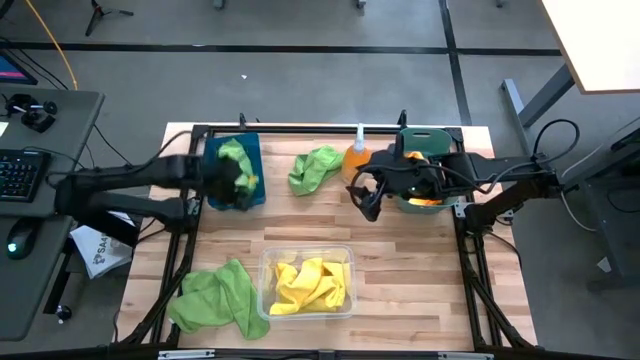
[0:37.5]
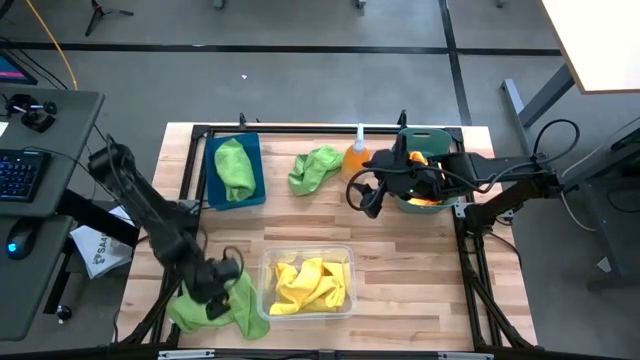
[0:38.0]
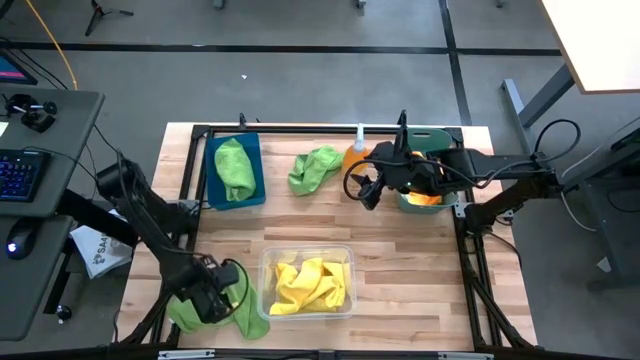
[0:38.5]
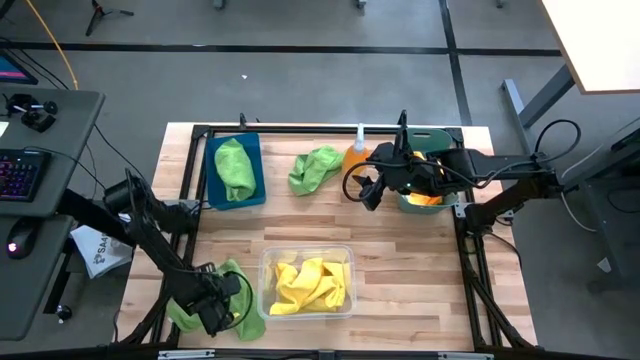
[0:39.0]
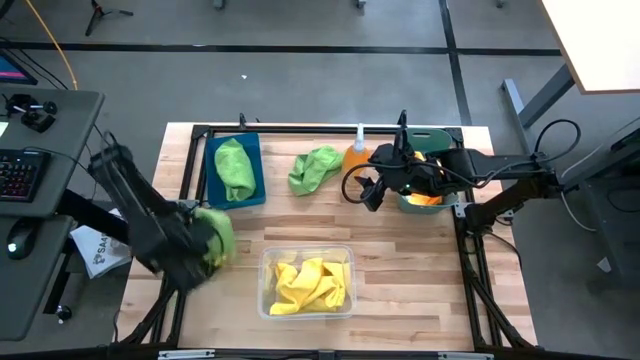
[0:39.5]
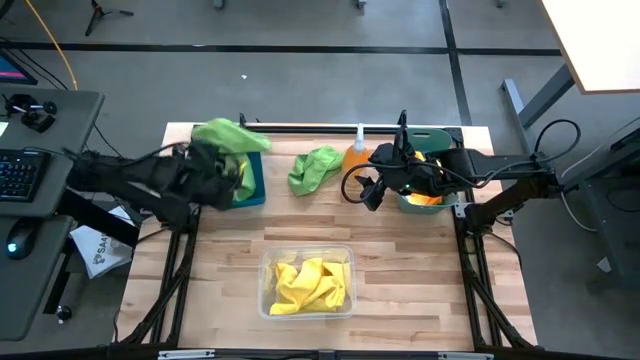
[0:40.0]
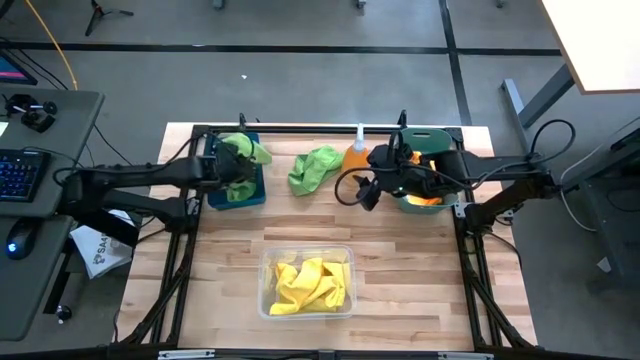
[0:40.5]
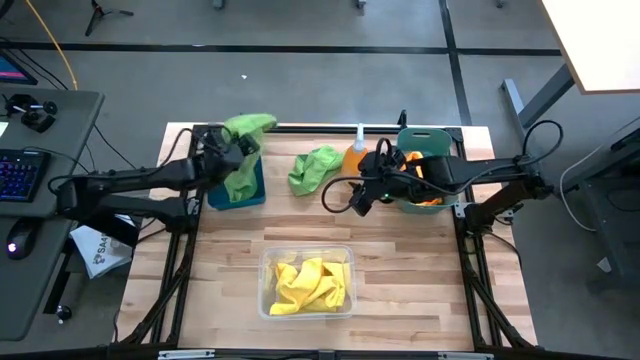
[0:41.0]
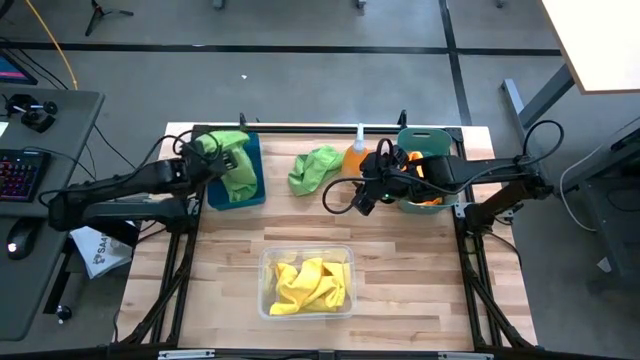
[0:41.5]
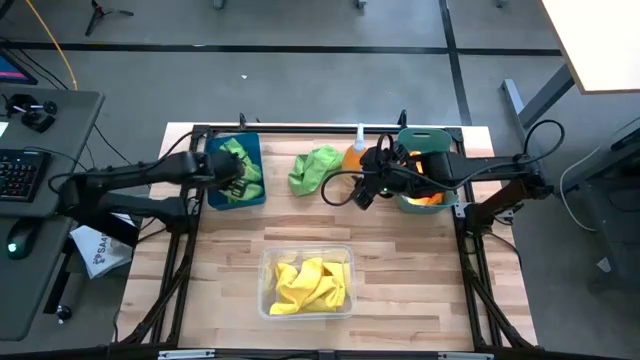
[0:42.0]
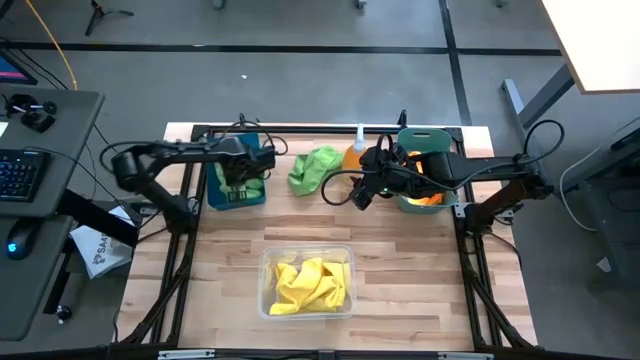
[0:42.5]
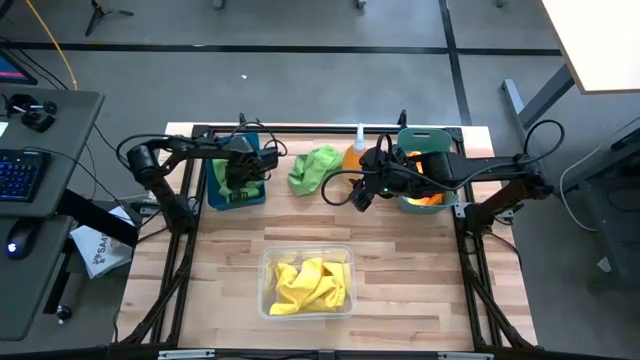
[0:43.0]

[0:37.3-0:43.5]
Task: Sort microfiber towel by color & place in baskets
Put the bottom green microfiber cloth into the blue bin

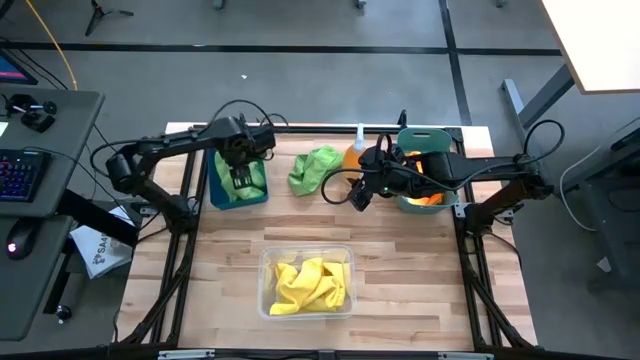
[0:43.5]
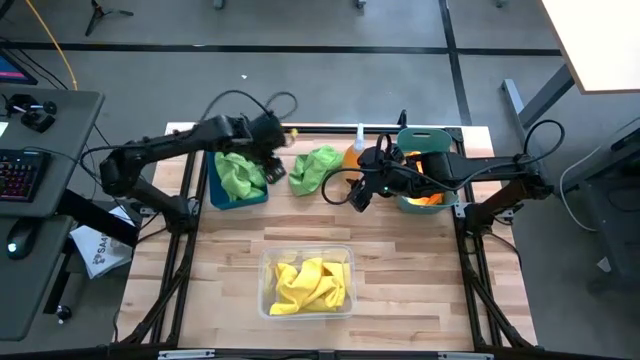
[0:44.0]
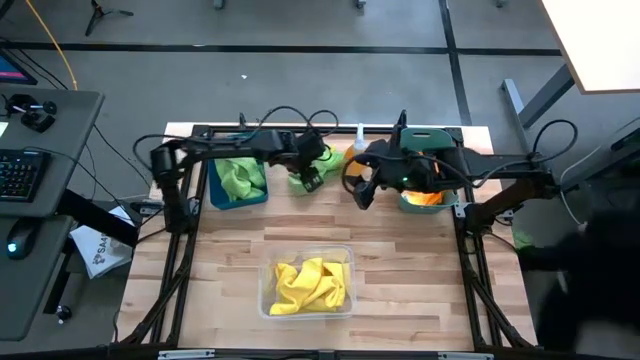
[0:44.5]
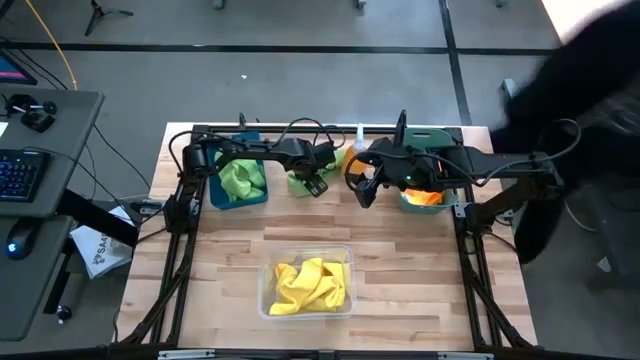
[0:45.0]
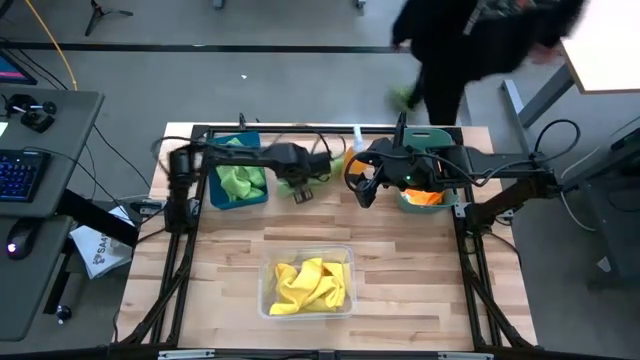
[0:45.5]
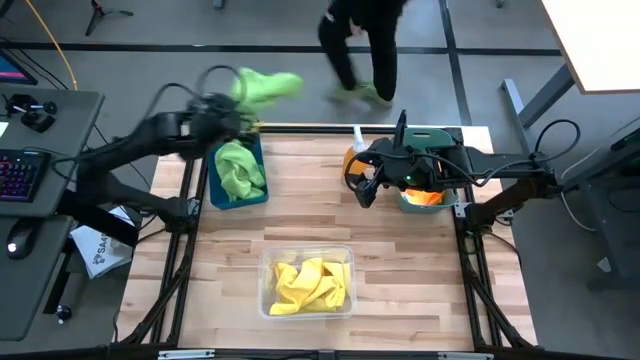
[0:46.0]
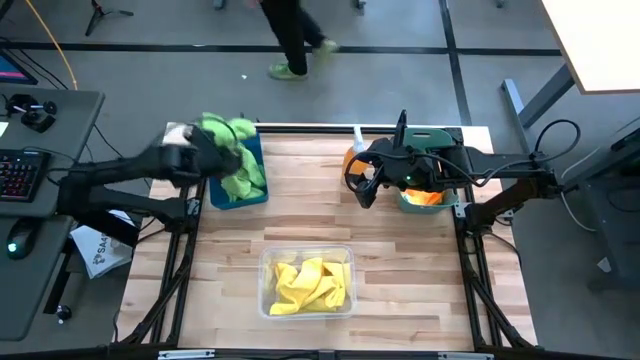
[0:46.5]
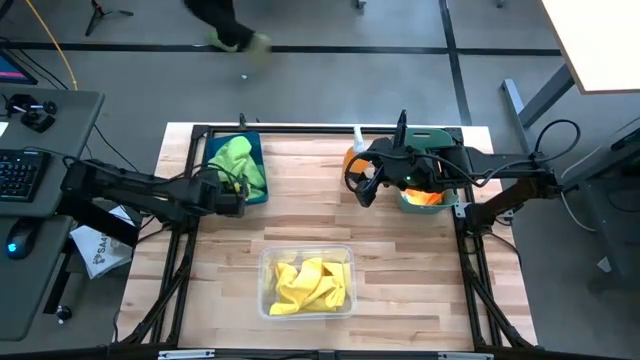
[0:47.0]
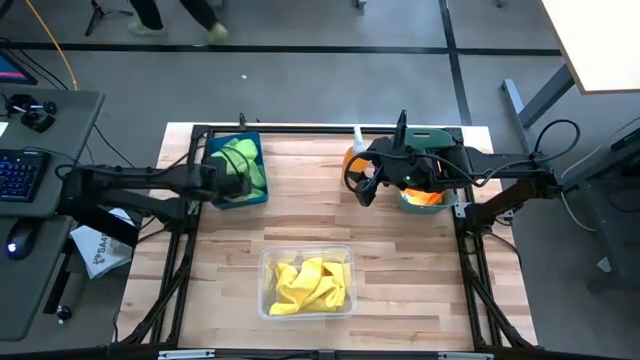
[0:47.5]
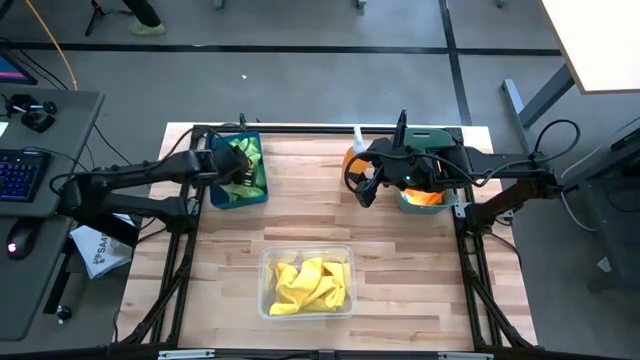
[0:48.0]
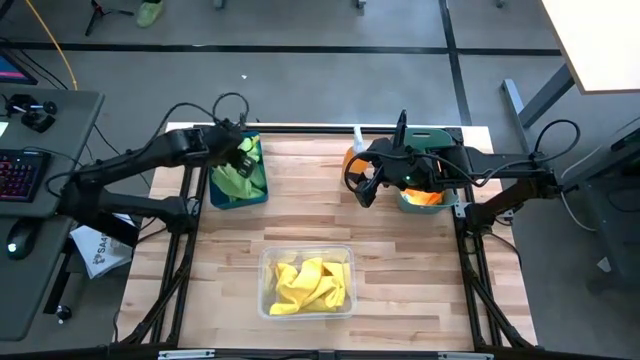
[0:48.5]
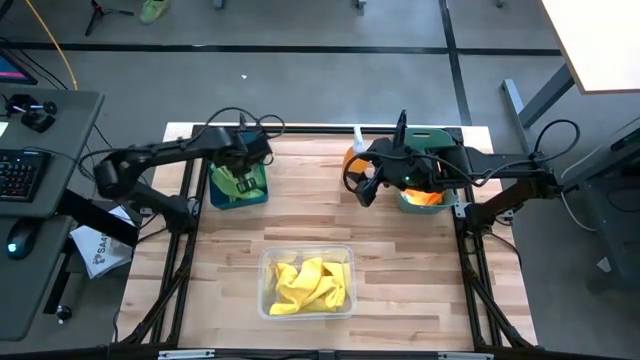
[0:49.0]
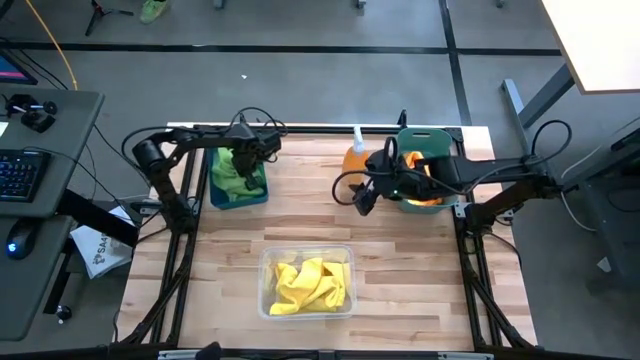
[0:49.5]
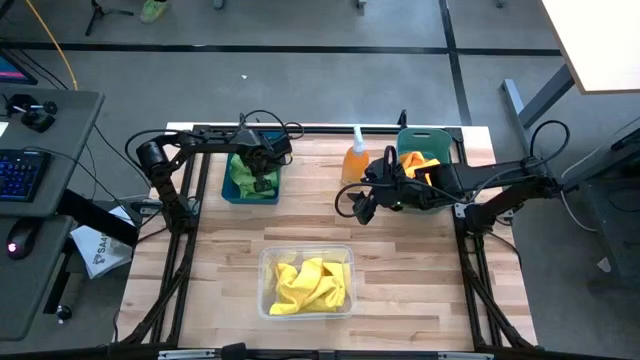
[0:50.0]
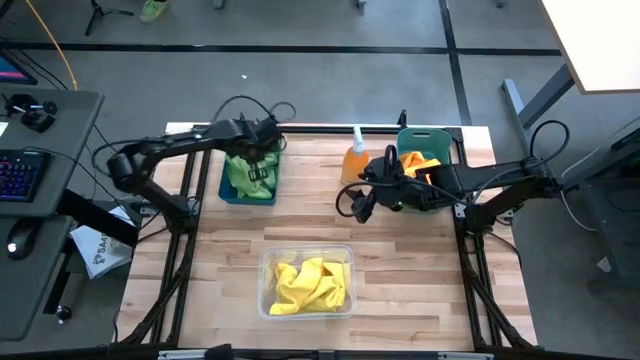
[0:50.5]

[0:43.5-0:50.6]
Put the green microfiber cloth into the blue bin

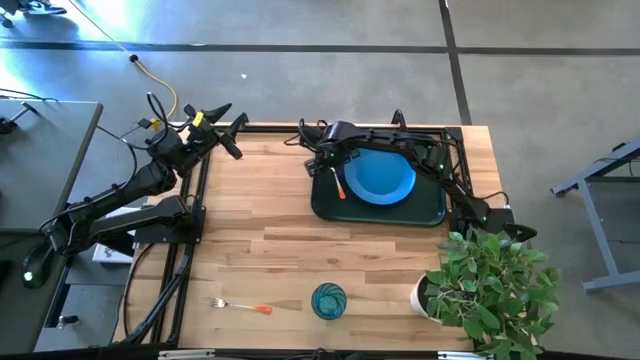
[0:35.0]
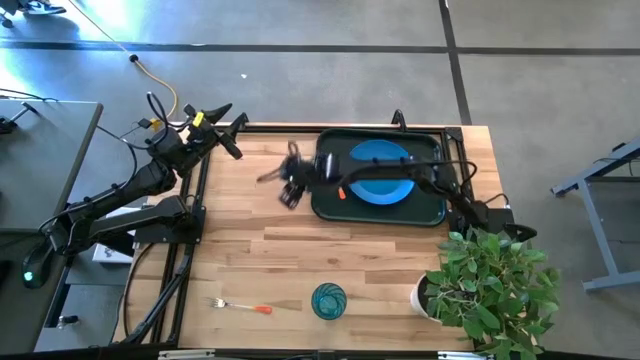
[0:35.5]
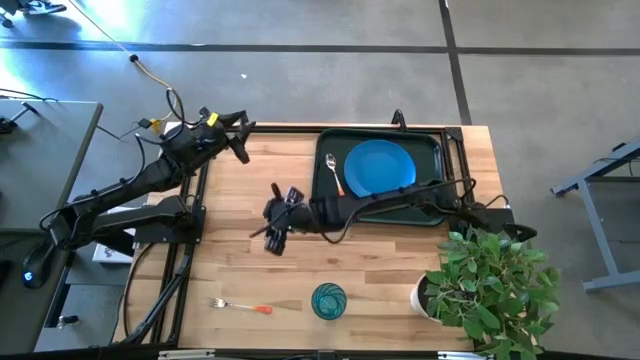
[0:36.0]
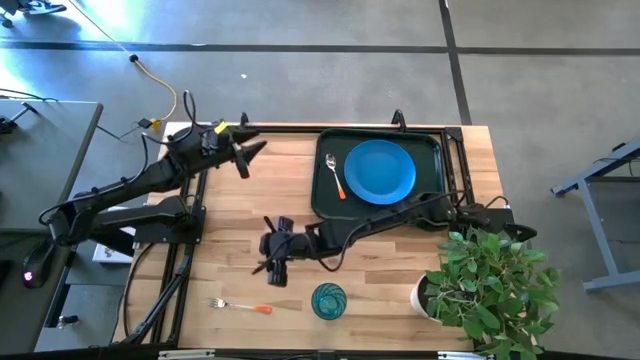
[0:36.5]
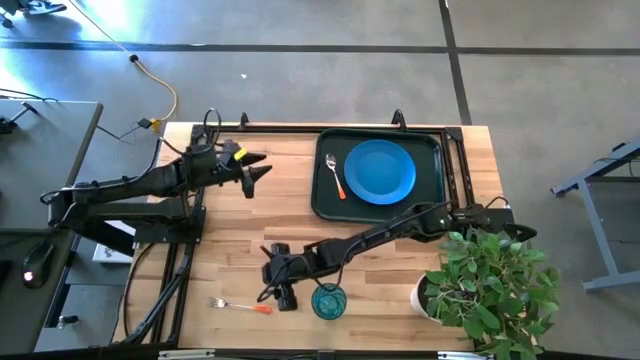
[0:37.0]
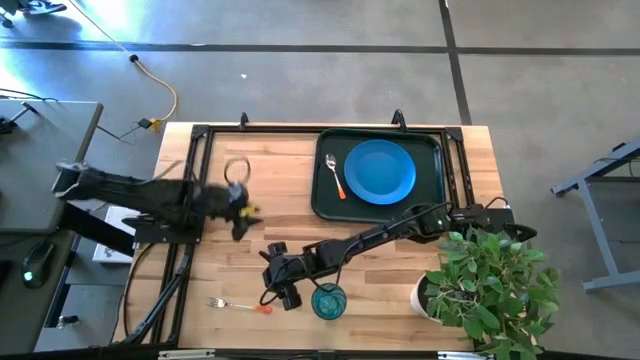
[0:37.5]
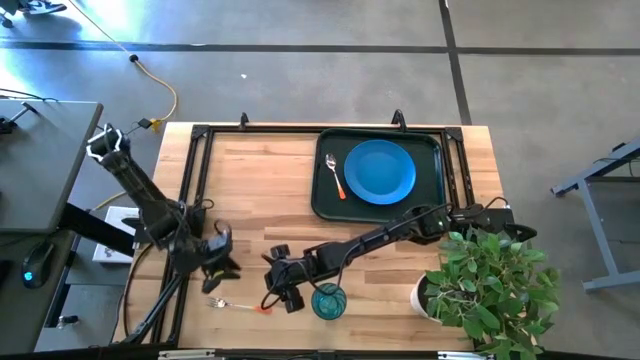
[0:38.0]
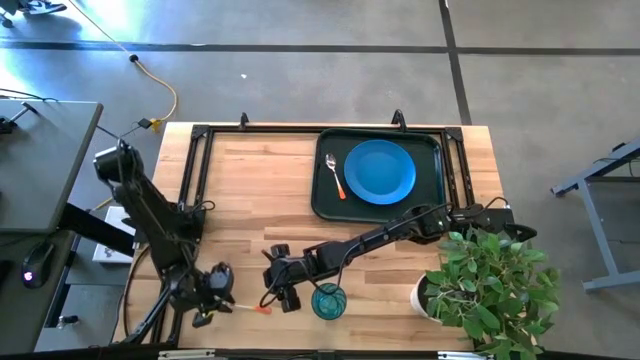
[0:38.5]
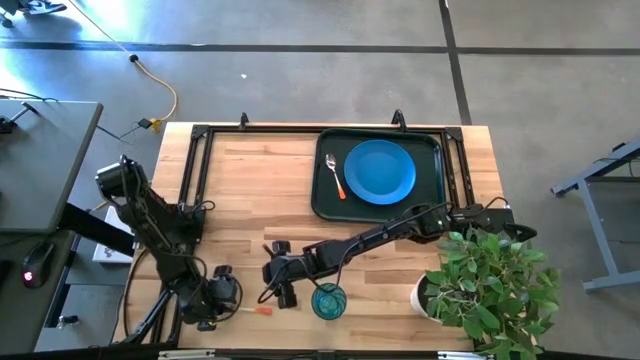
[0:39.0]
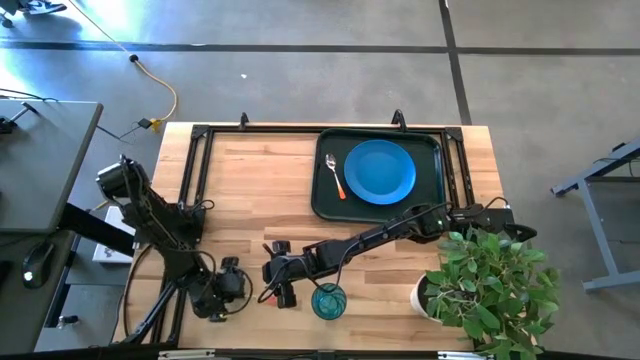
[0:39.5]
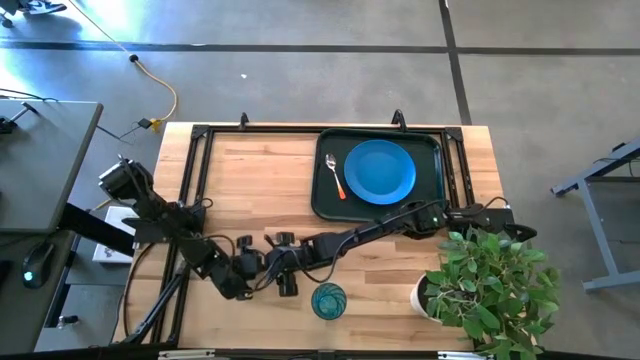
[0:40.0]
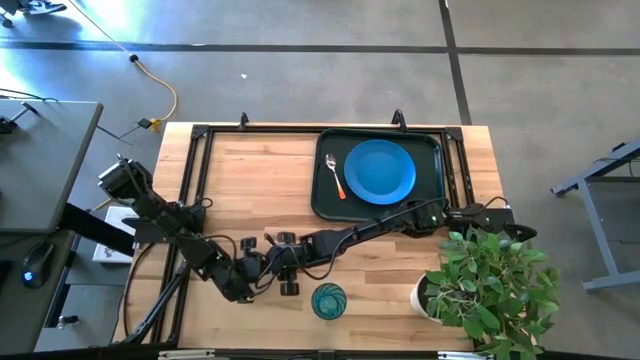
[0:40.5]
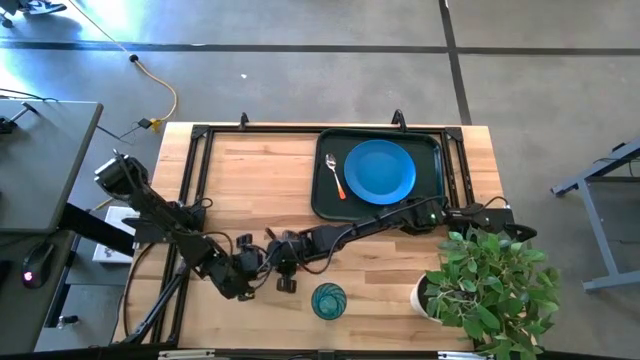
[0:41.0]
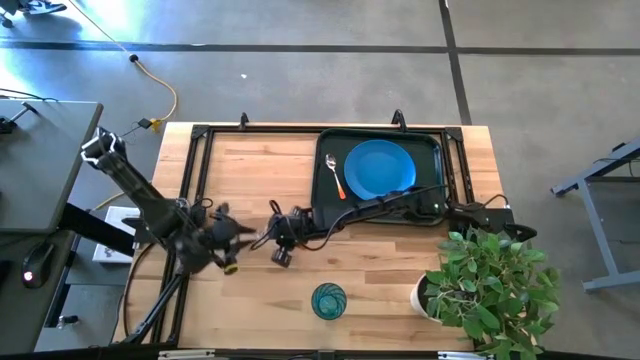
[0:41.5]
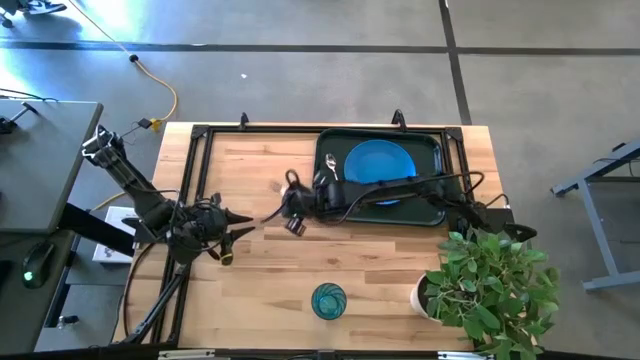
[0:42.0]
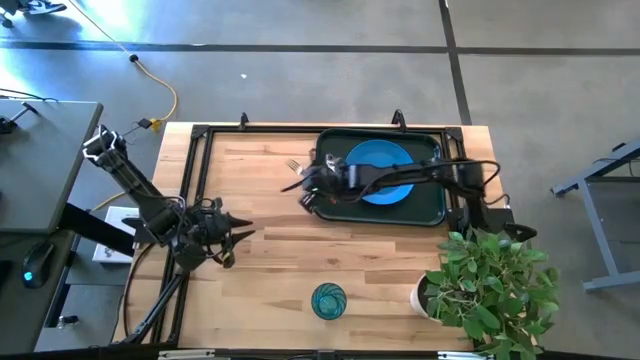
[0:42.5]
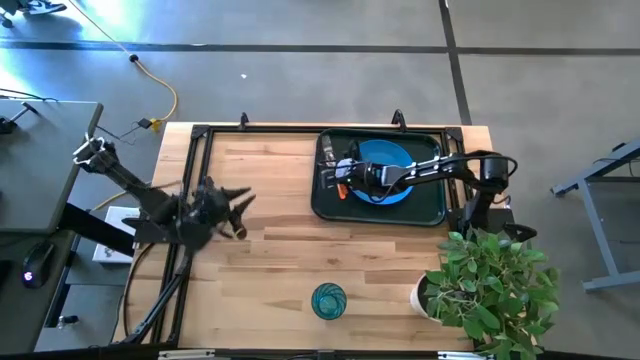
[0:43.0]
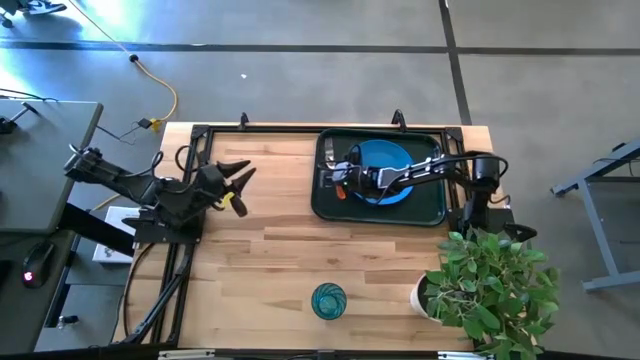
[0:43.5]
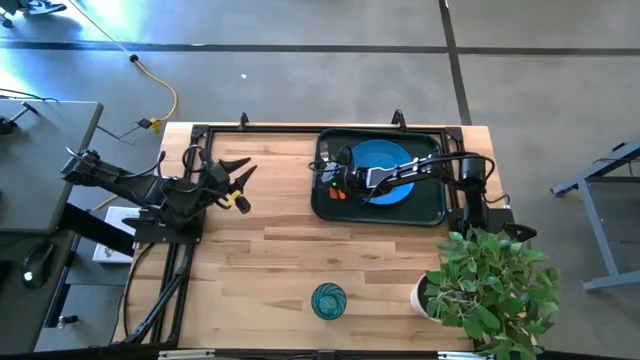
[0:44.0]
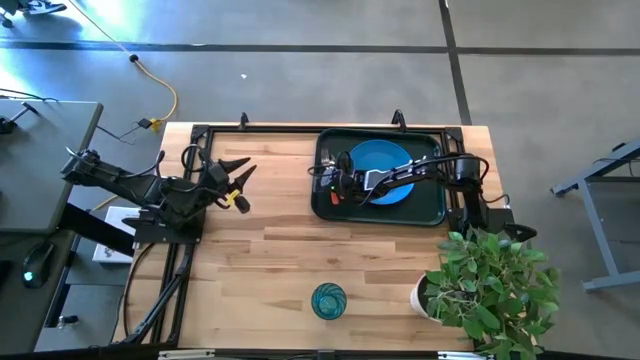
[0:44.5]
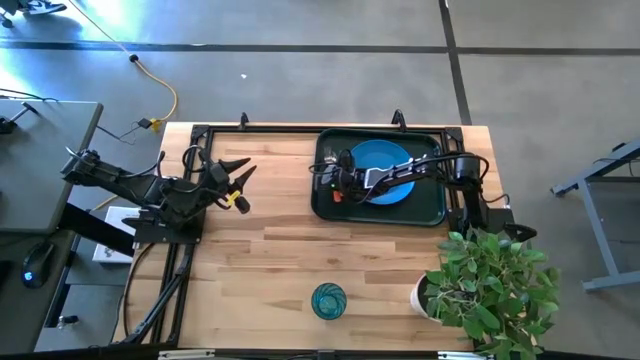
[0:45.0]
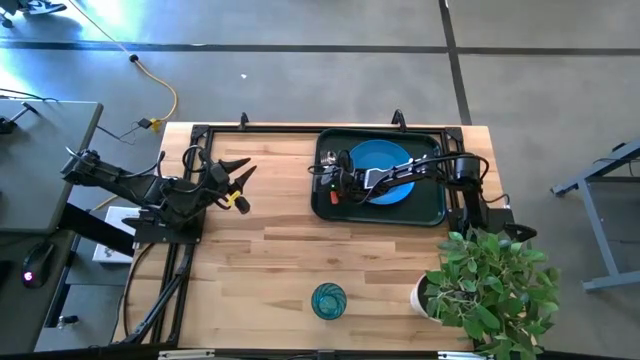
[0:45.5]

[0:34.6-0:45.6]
Task: Pick and place plate/cup/fork/spoon on tray
Put the orange fork on the green serving tray to the left of the orange spoon
